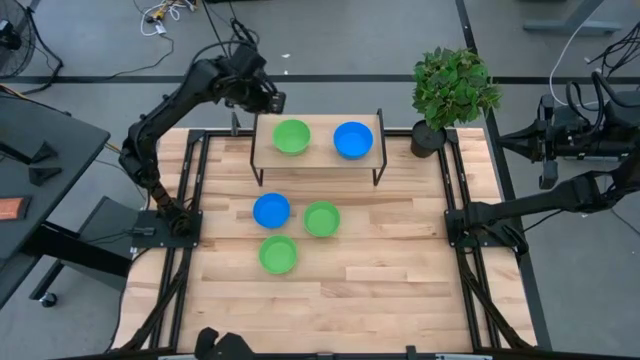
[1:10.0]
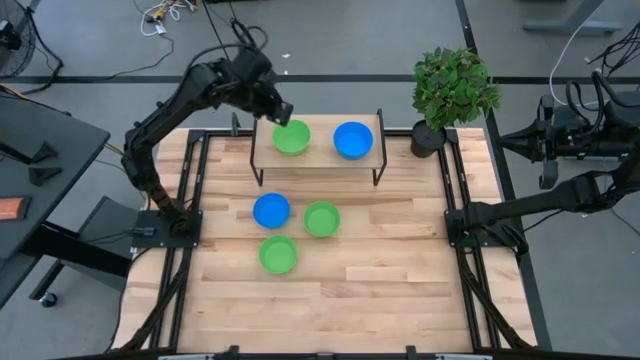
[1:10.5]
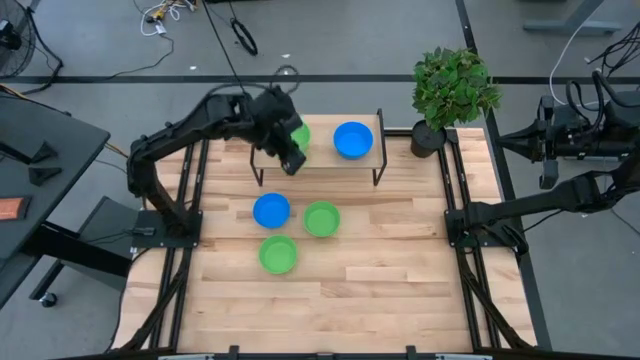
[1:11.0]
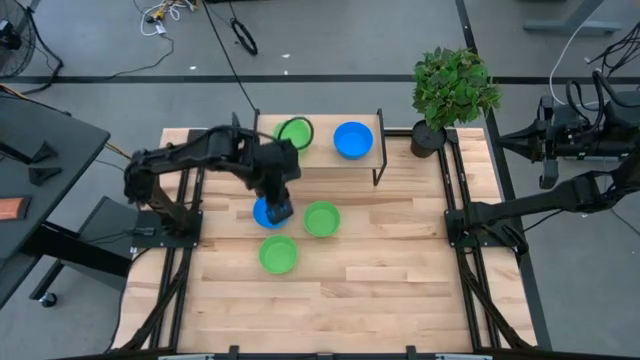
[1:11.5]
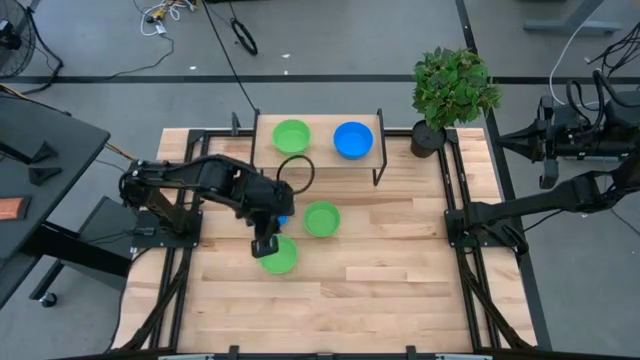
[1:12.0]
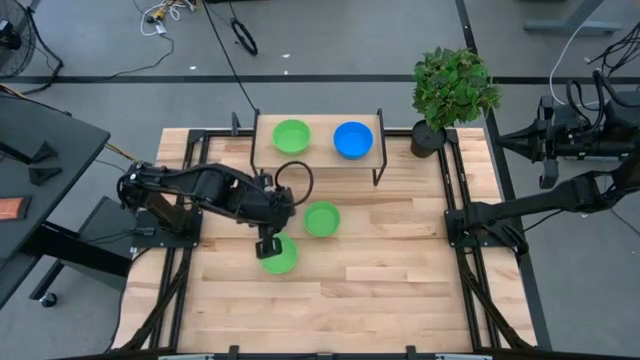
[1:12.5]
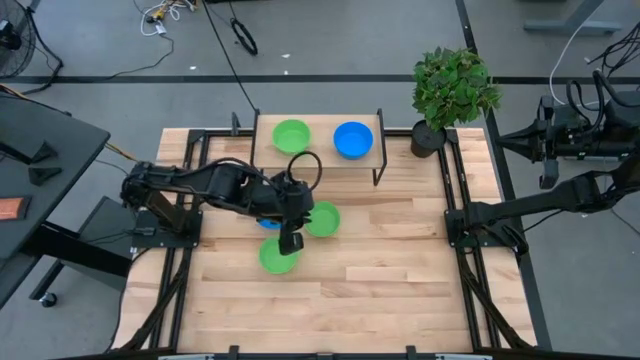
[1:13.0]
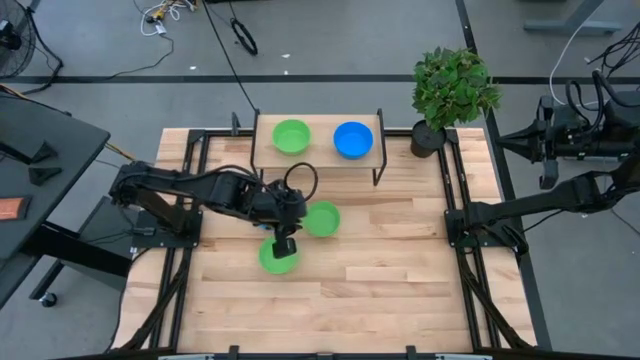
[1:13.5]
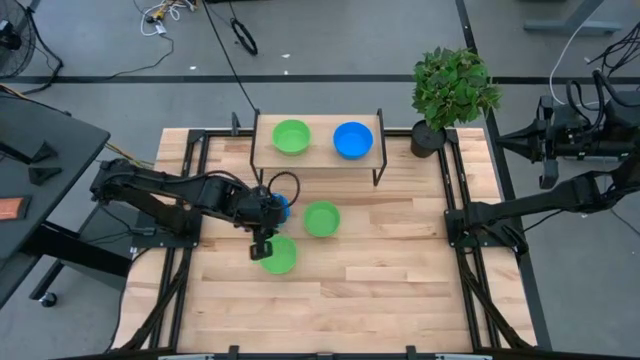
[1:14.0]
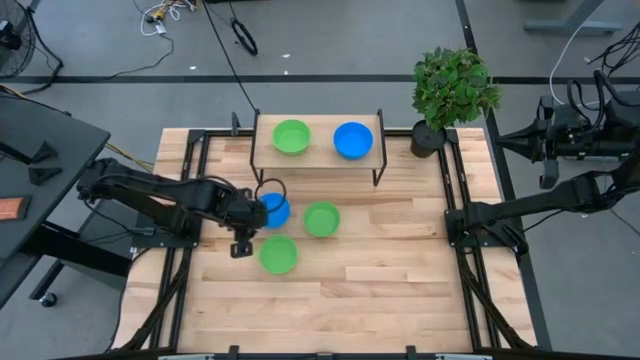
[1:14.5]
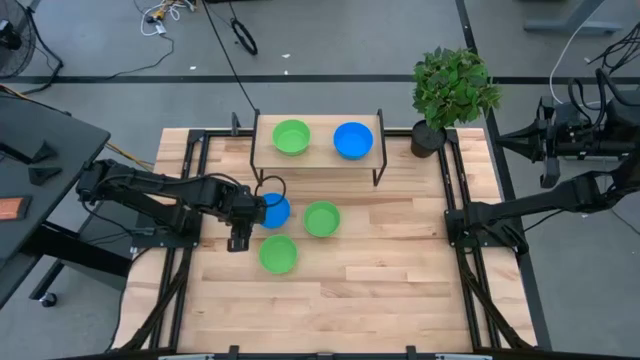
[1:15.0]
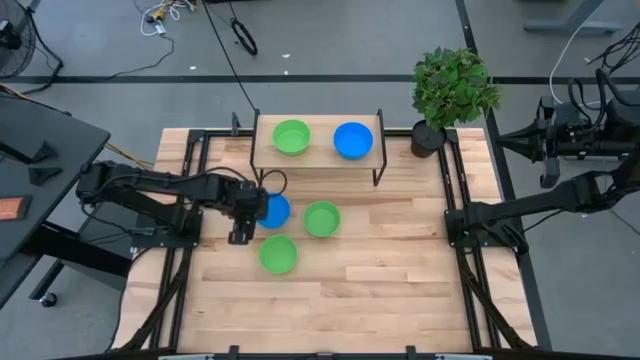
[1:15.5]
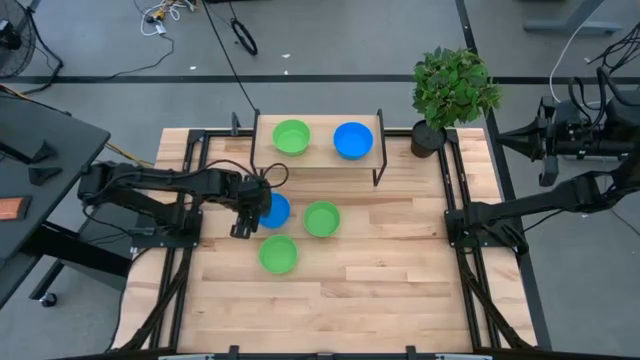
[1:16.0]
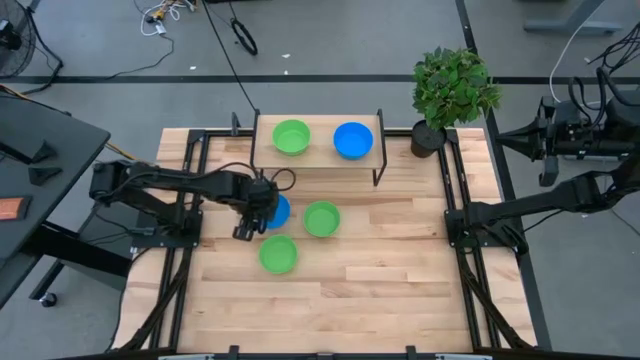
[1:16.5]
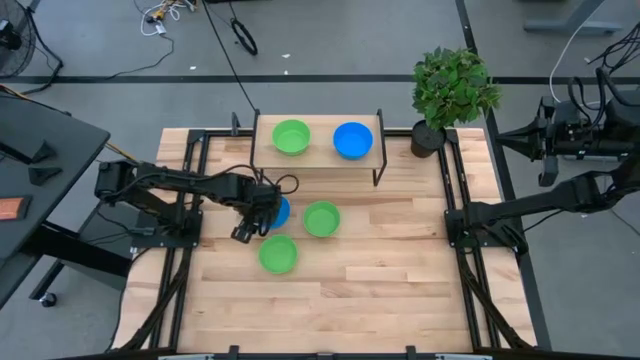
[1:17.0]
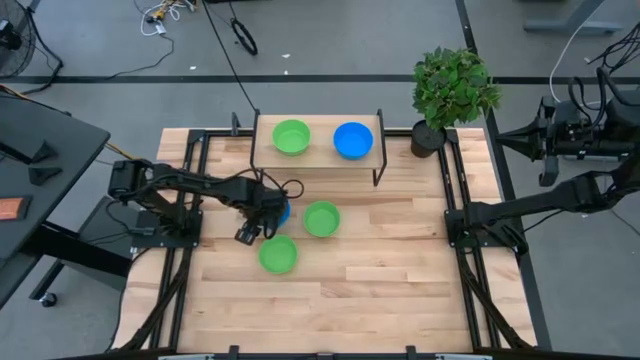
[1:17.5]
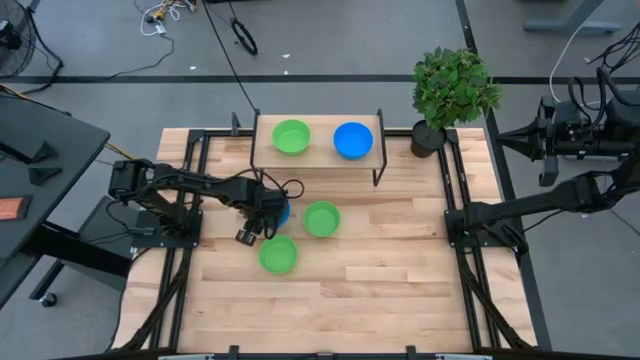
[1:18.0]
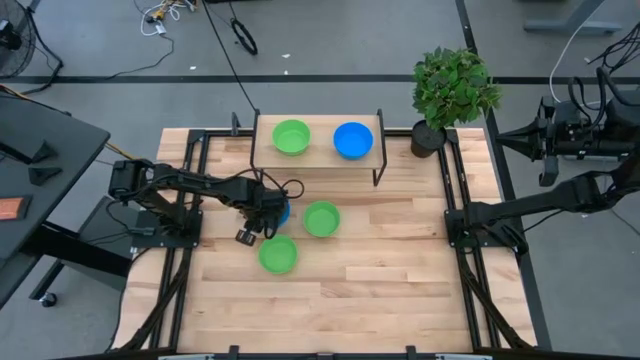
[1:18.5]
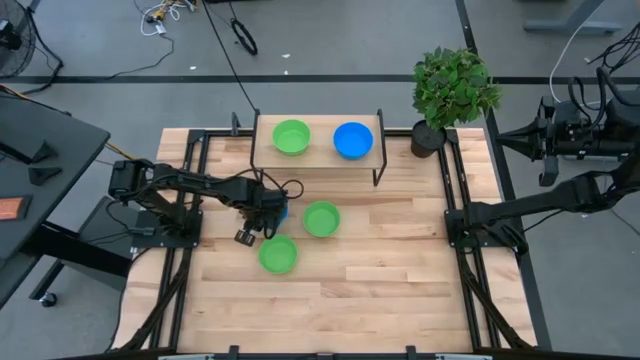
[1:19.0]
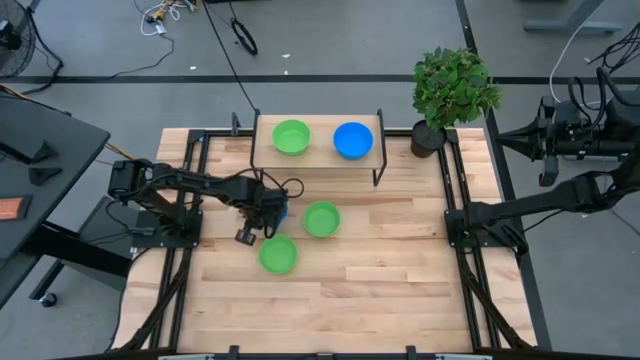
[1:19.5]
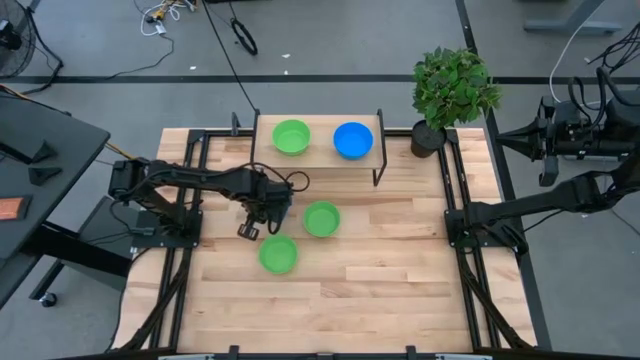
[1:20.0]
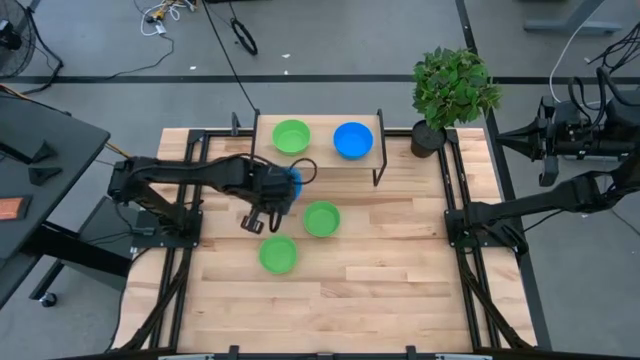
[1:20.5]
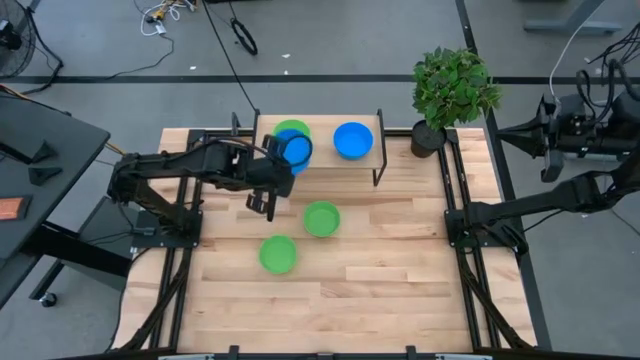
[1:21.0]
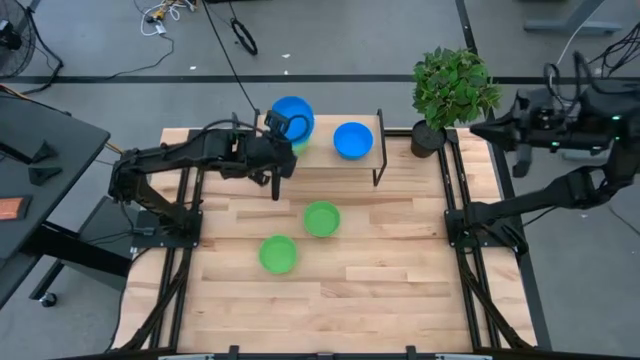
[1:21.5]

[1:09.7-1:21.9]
Task: Pick & Place Mini bowls
Stack the blue bowl on the blue bowl on the shelf

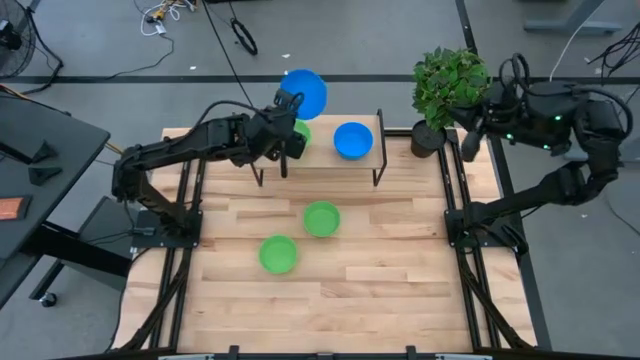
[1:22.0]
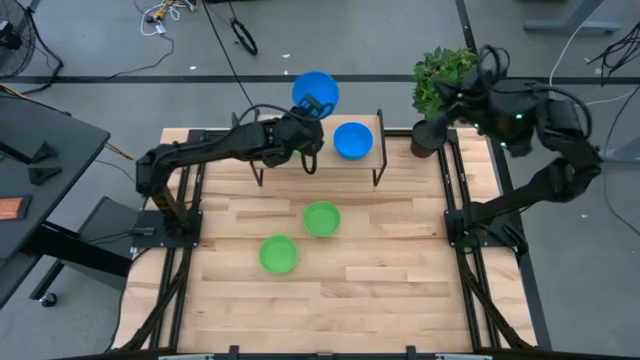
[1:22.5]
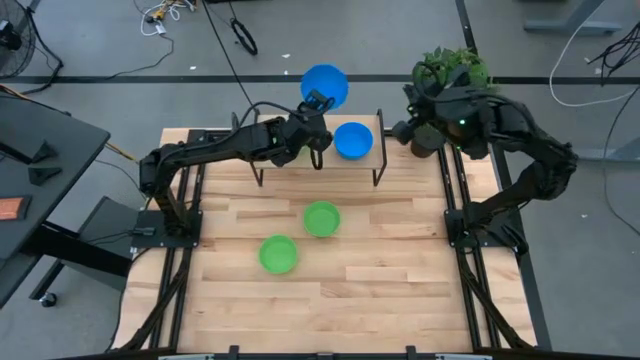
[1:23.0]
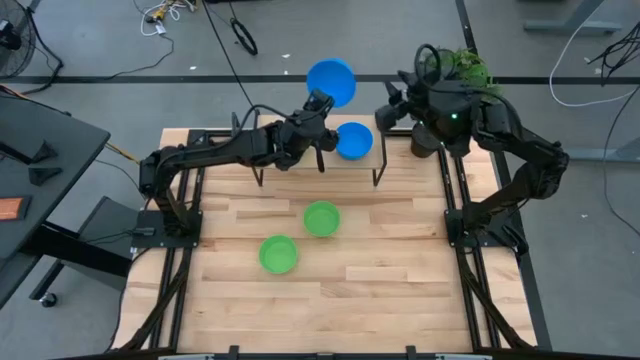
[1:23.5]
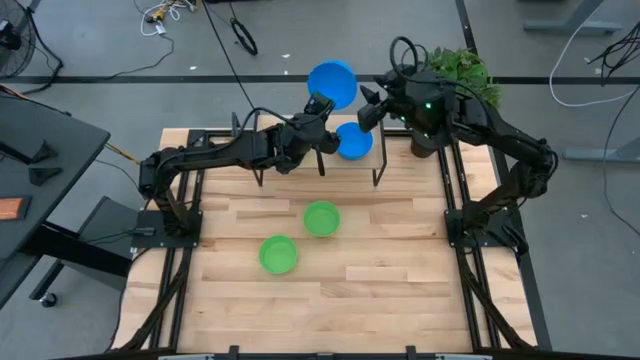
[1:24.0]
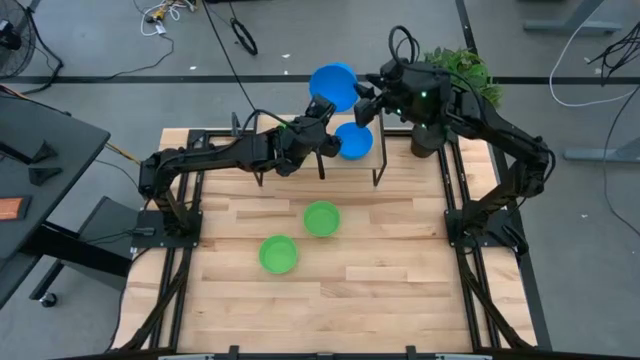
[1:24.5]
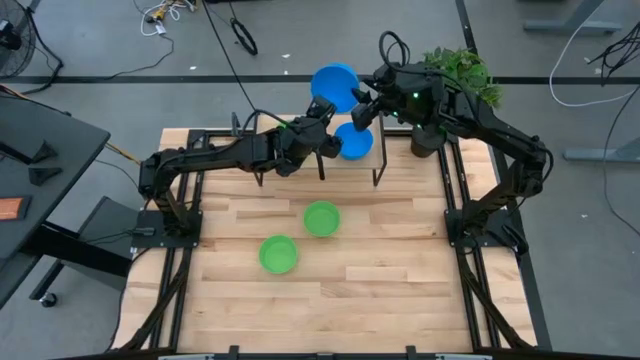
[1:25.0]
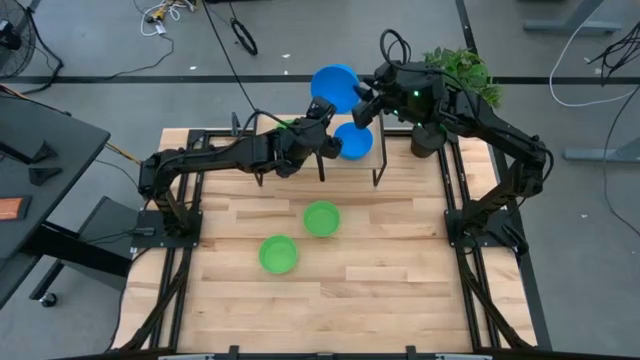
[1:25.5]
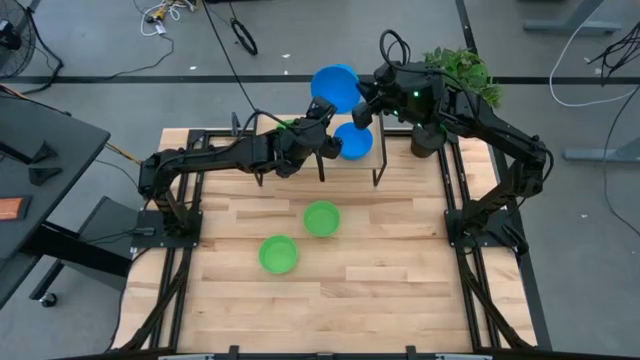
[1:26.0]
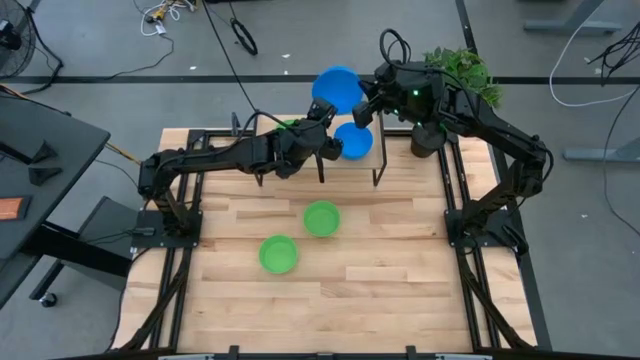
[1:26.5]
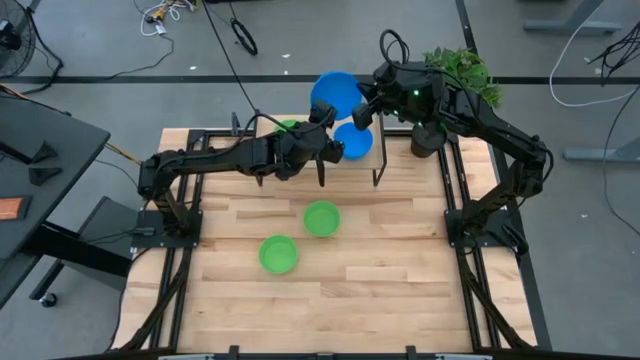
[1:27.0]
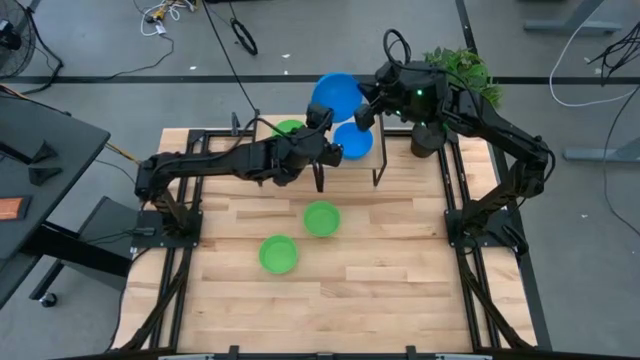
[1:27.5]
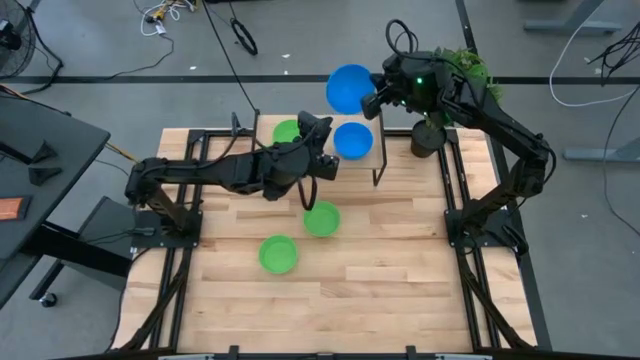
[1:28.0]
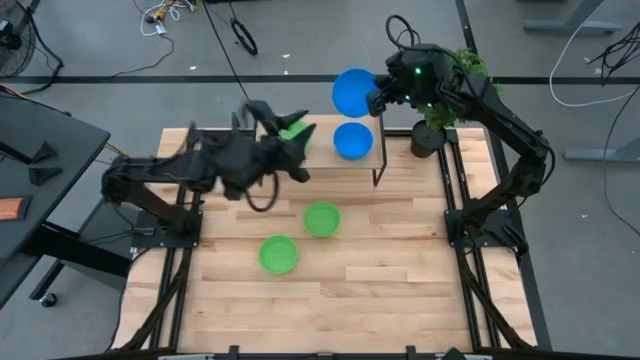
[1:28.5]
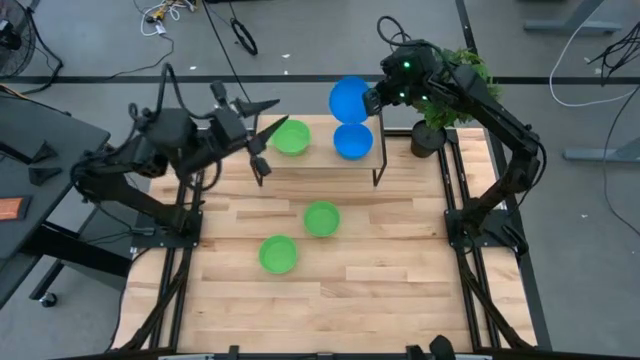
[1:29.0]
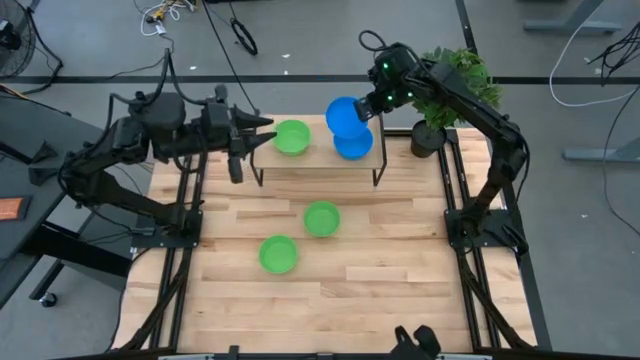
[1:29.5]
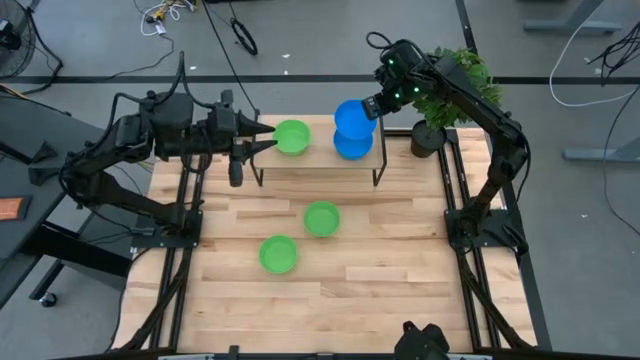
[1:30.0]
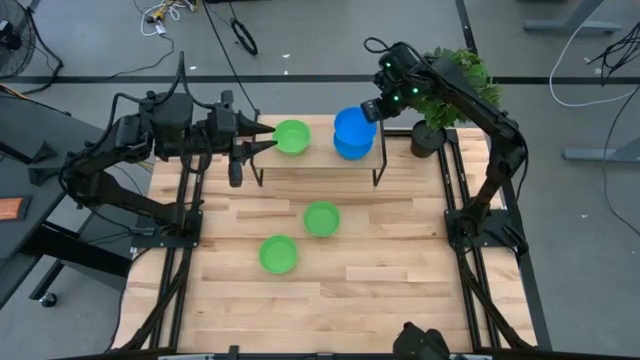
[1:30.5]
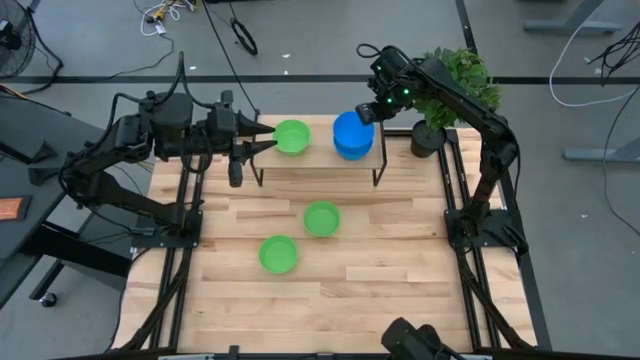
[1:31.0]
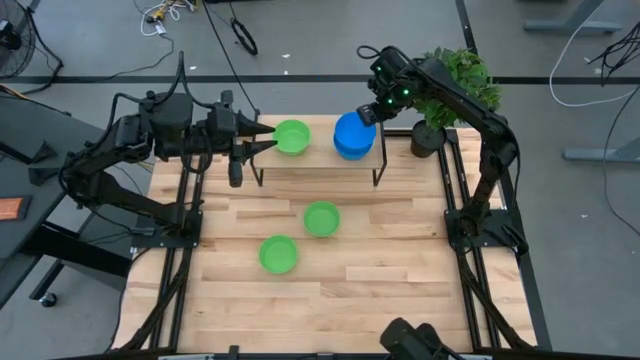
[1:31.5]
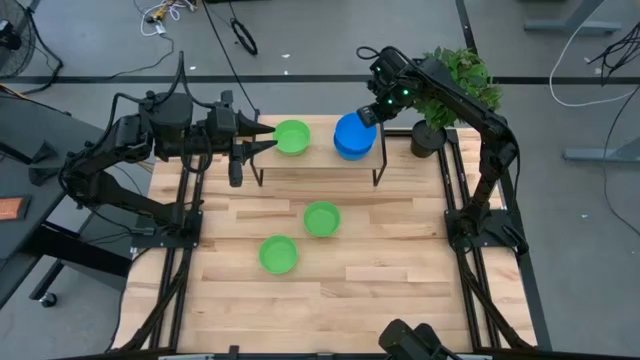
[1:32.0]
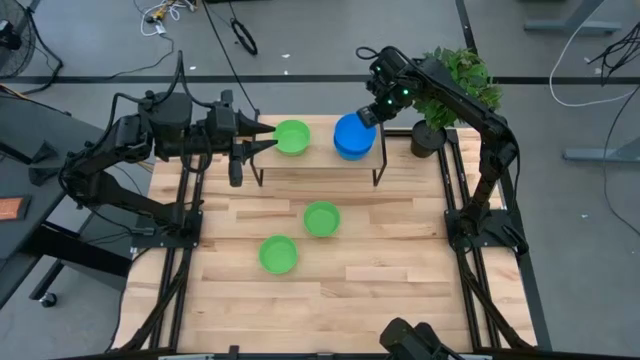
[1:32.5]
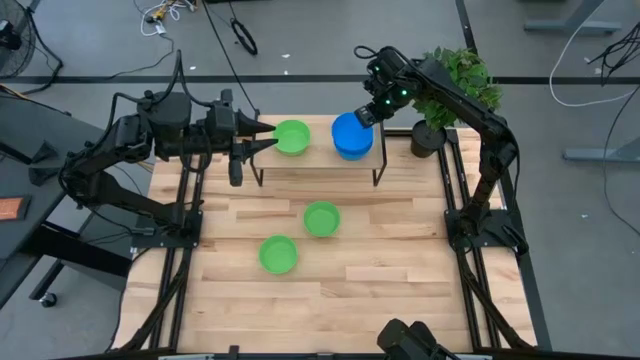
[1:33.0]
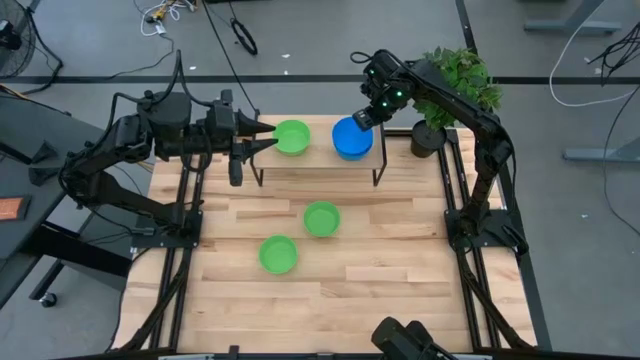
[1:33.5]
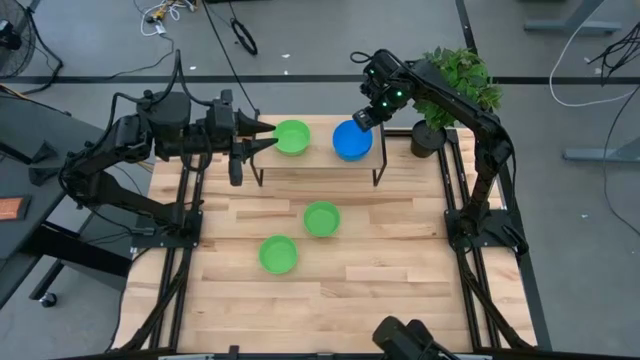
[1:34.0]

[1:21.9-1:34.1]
Stack the blue bowl on the blue bowl on the shelf
